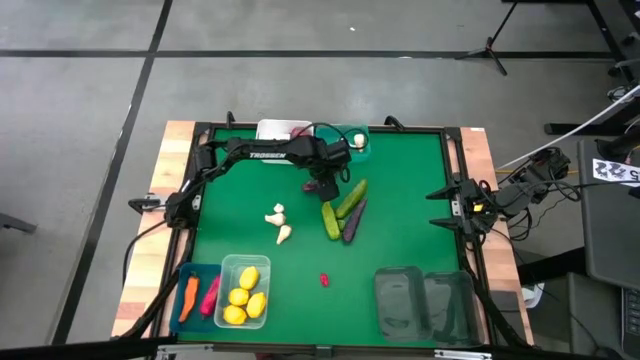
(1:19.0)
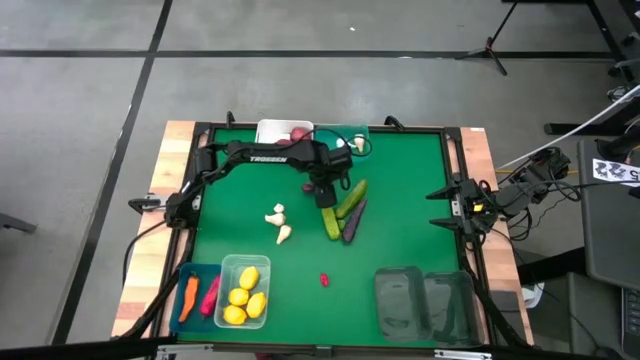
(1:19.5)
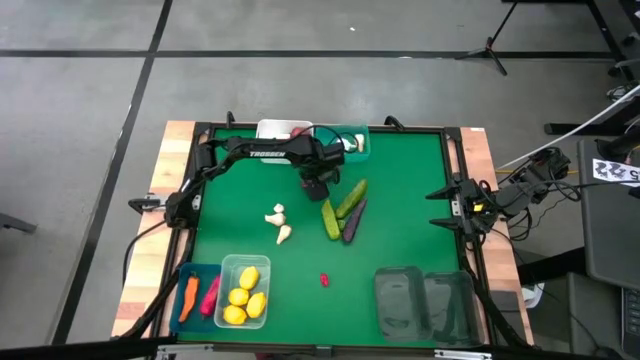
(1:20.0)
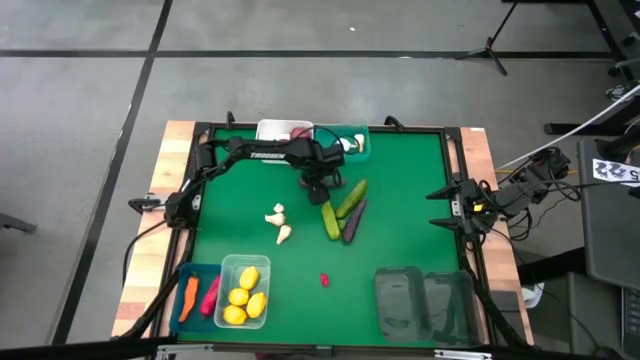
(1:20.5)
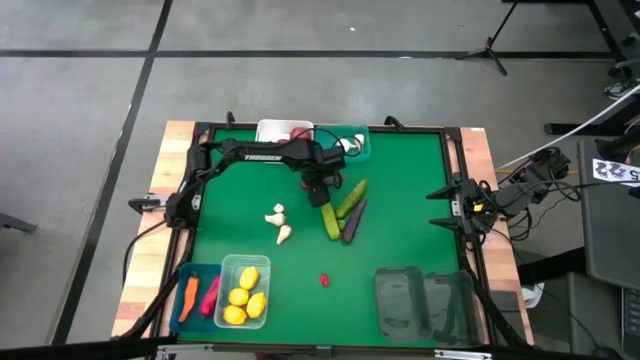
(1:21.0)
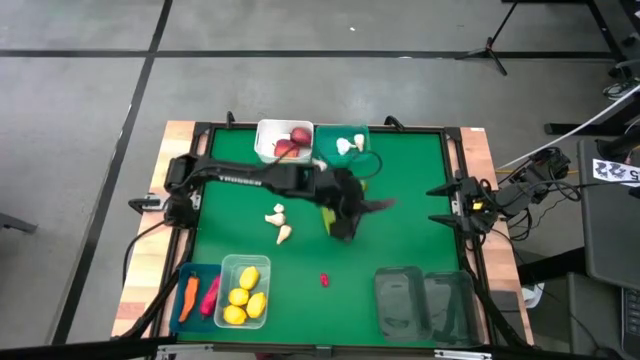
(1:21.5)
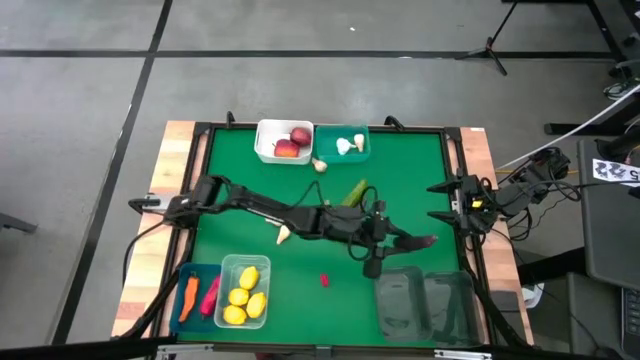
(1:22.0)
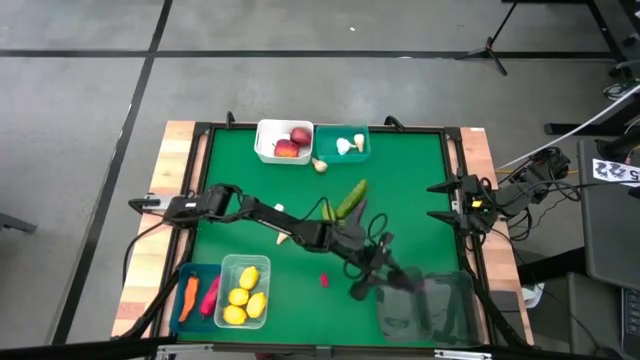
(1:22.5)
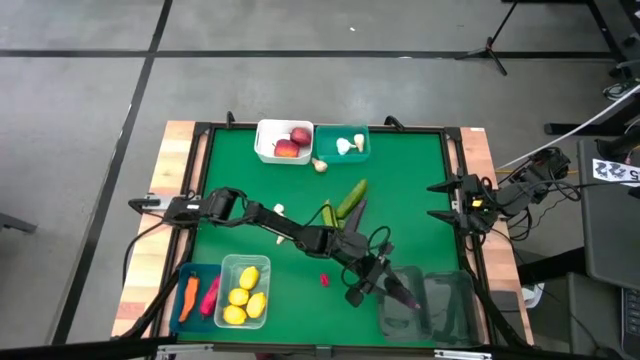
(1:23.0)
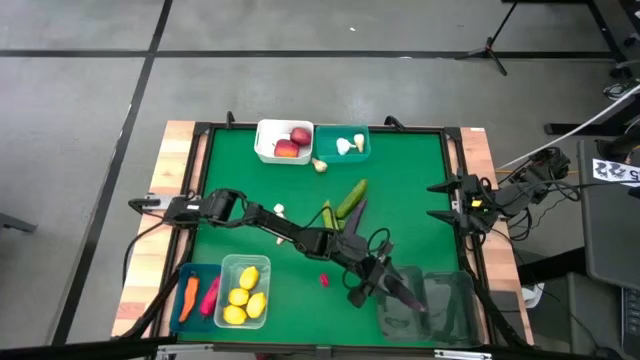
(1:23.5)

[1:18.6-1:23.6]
Task: Sort produce into baskets
Put the eggplant into the left black bin

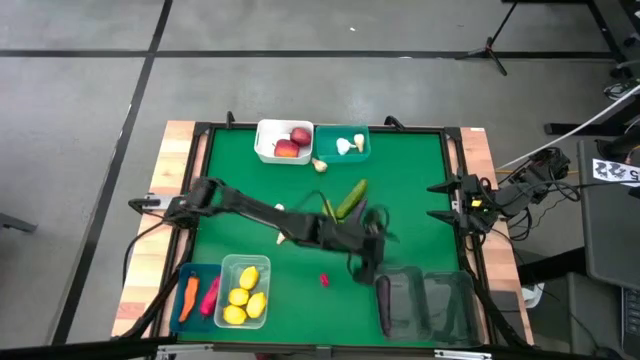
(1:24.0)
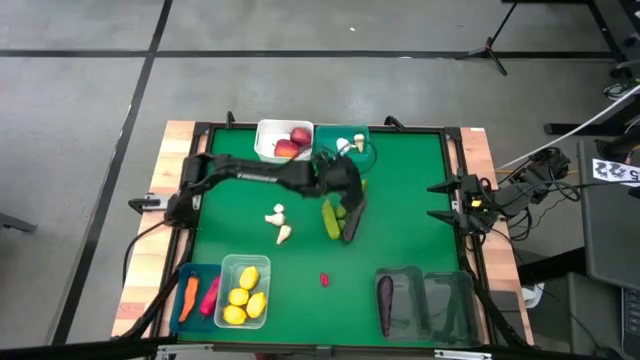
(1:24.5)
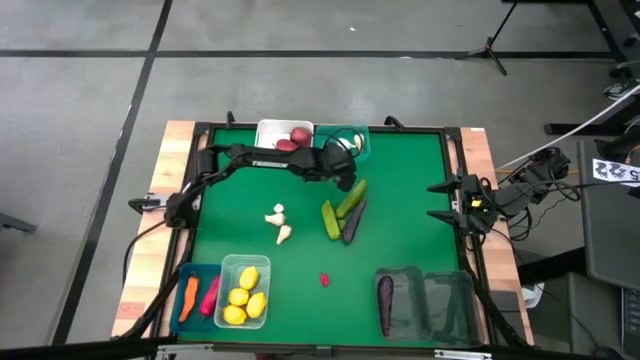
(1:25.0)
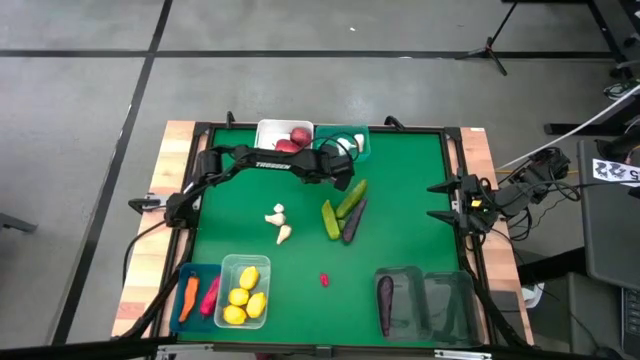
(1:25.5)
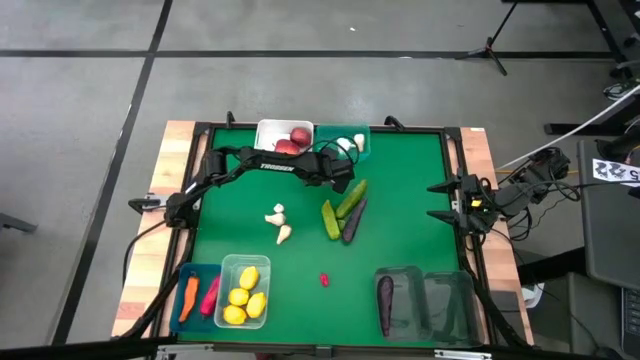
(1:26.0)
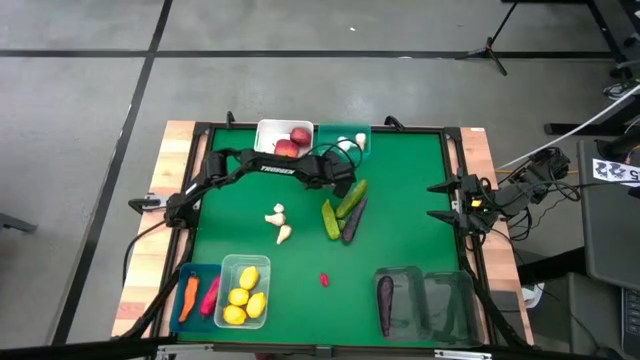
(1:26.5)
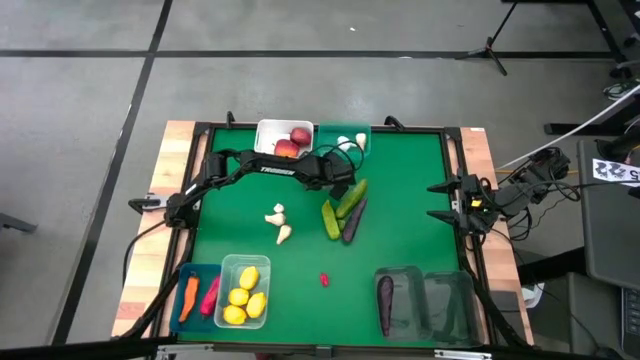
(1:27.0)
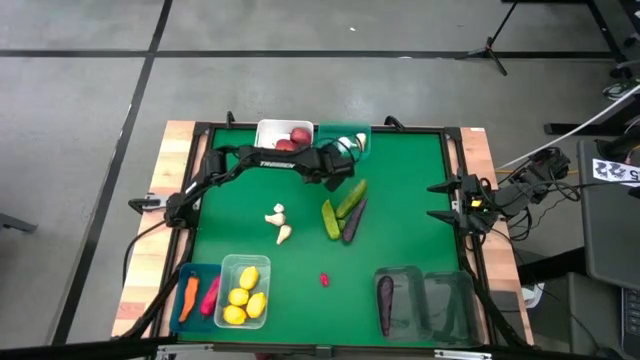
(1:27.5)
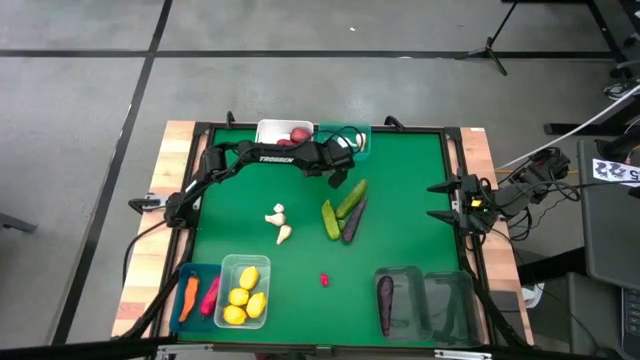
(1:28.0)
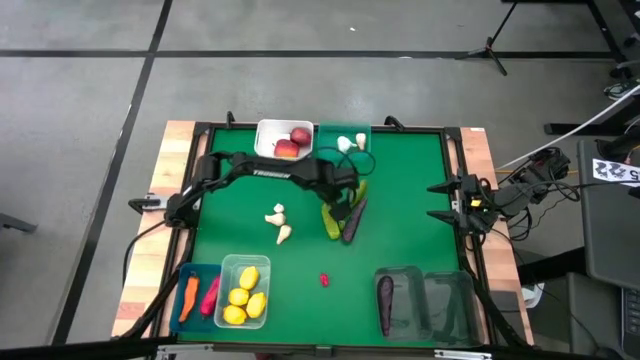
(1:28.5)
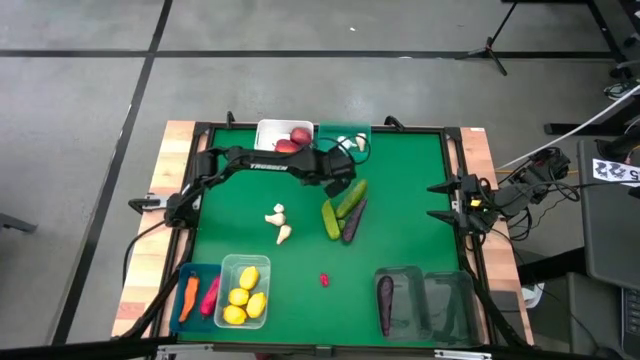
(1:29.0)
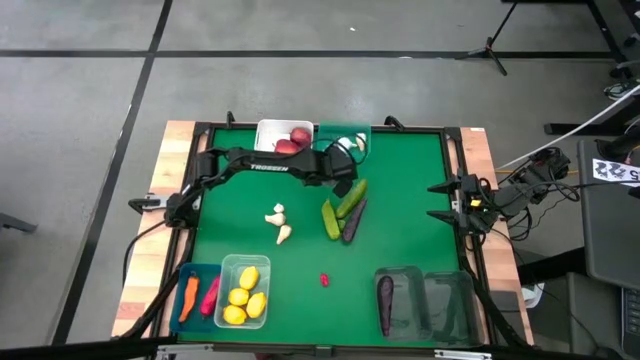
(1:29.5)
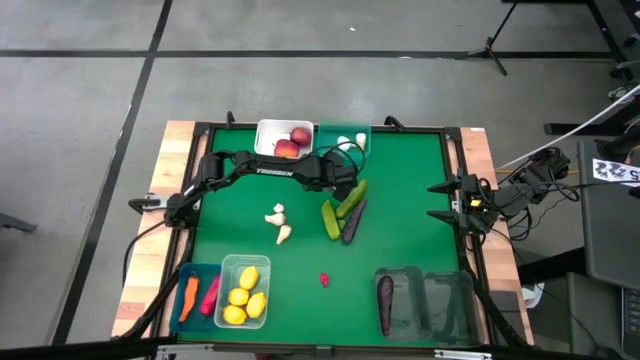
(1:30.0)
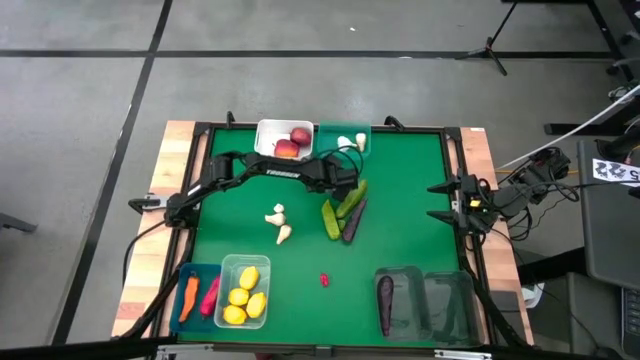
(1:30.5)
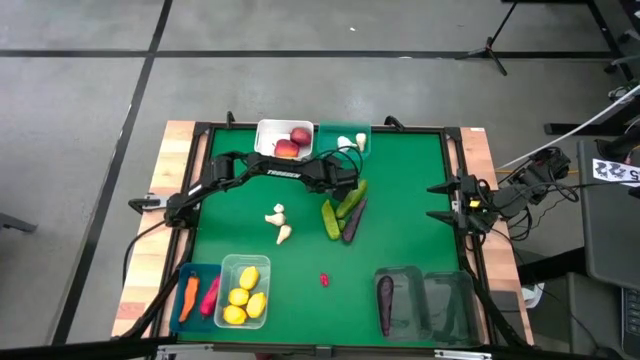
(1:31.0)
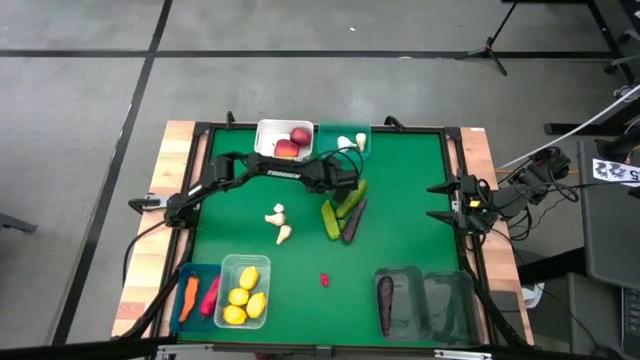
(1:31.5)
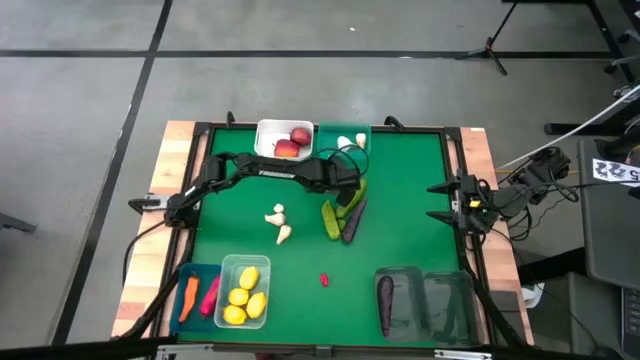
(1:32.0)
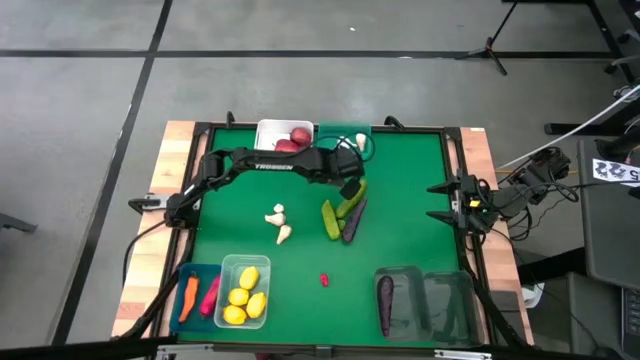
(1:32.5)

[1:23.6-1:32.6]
Put the white garlic into the green bin

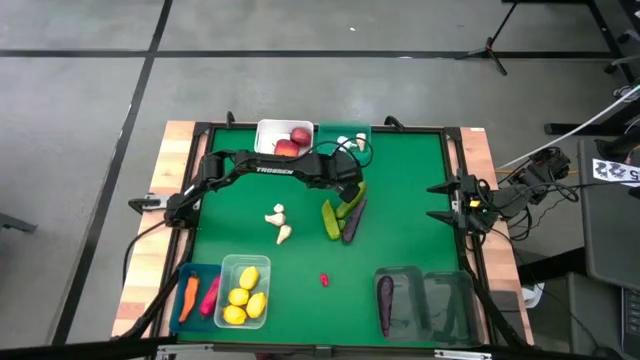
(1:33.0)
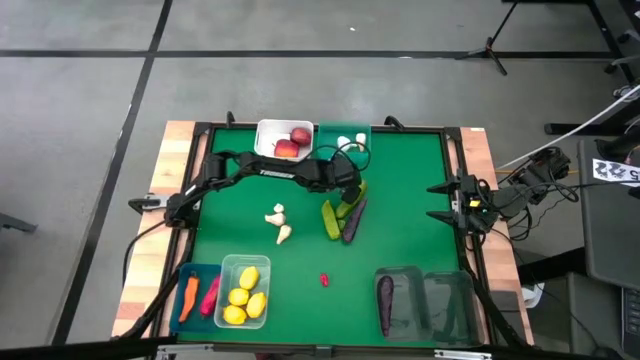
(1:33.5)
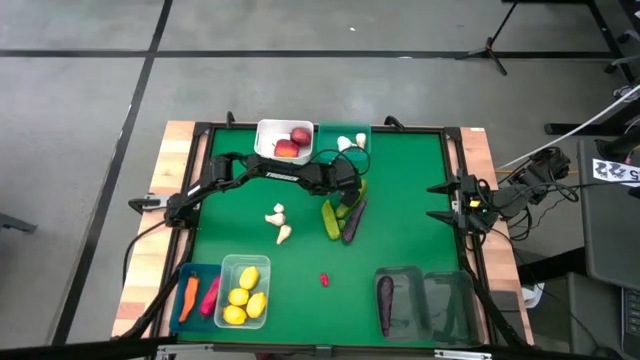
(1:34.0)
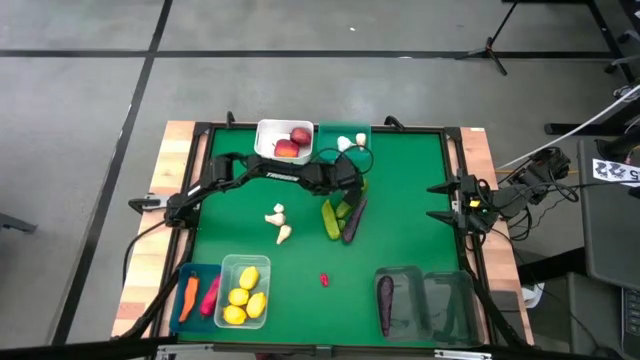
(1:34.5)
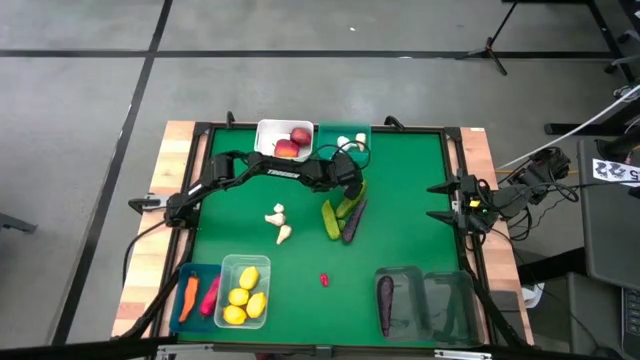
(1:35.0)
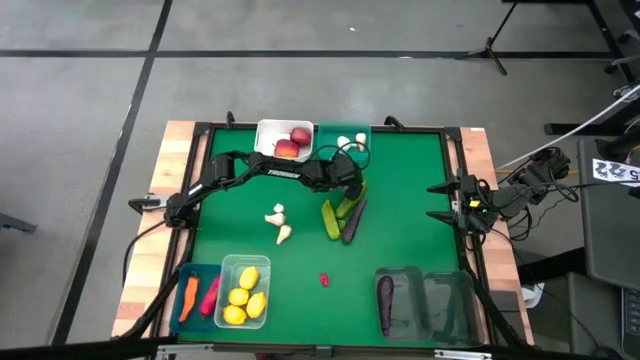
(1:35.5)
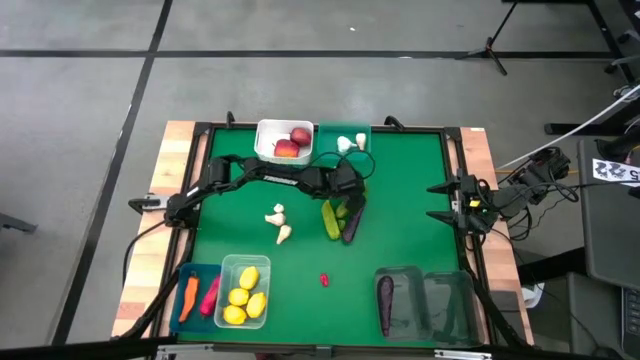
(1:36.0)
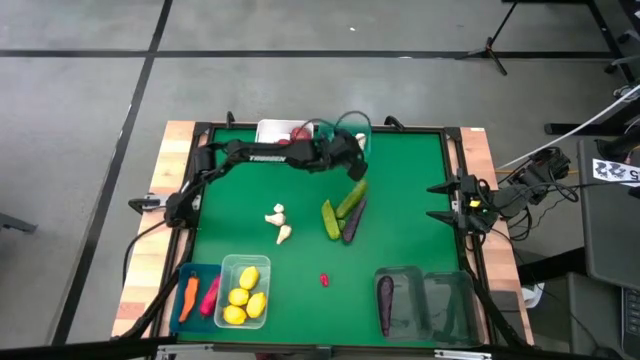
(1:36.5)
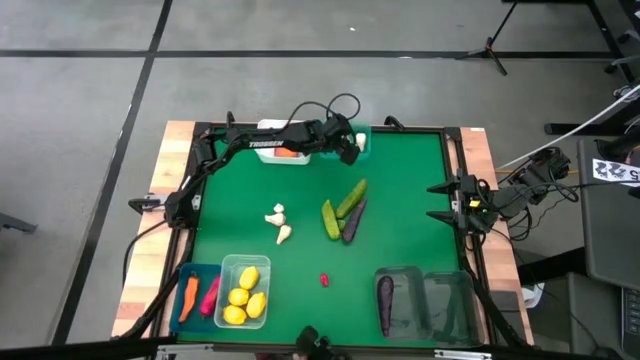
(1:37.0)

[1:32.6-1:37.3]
Put the white garlic into the green bin

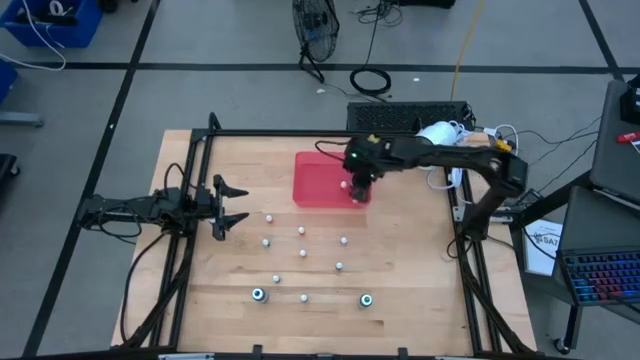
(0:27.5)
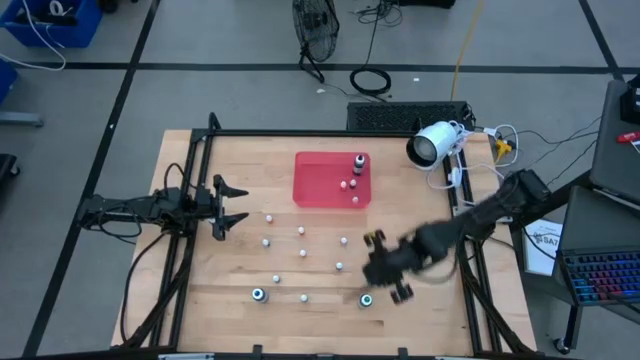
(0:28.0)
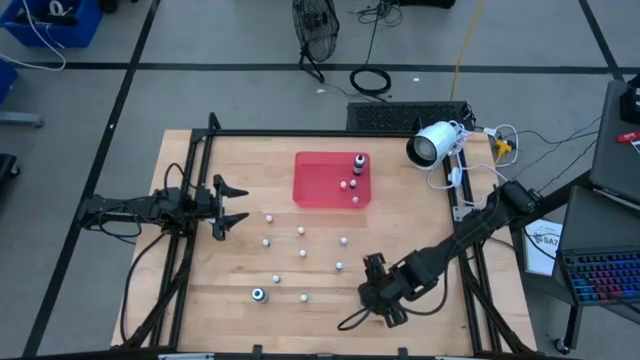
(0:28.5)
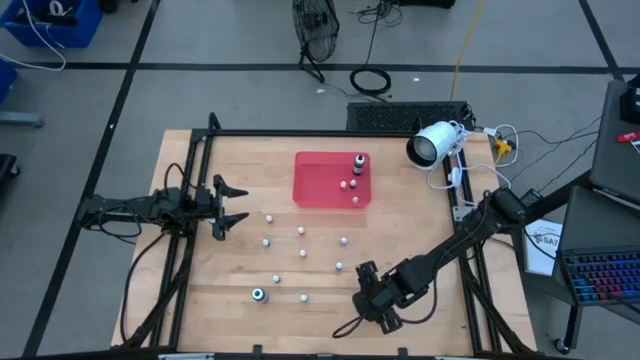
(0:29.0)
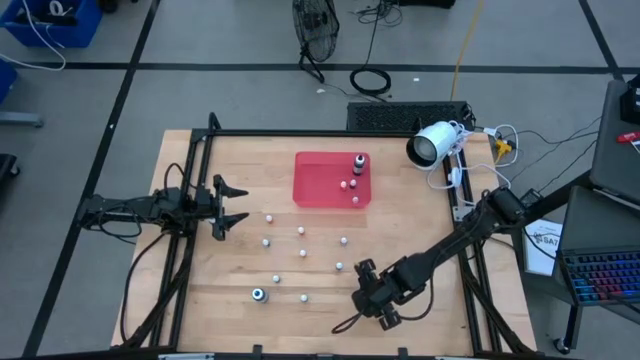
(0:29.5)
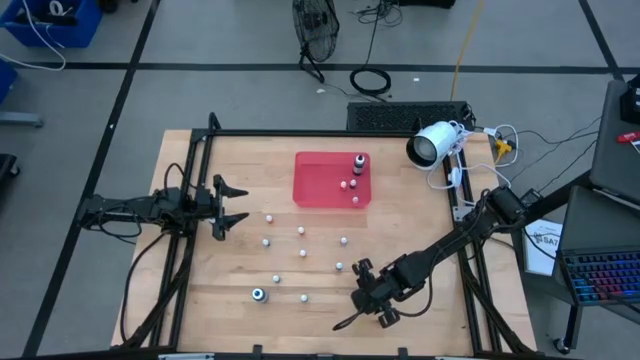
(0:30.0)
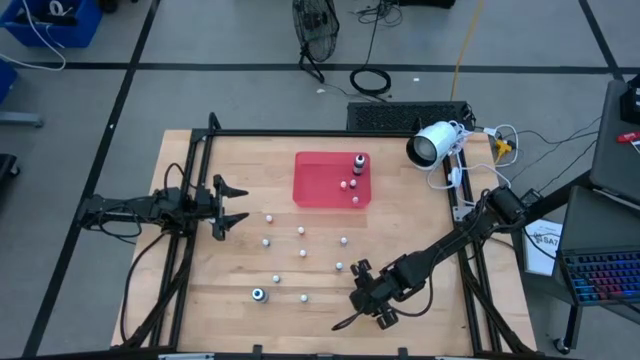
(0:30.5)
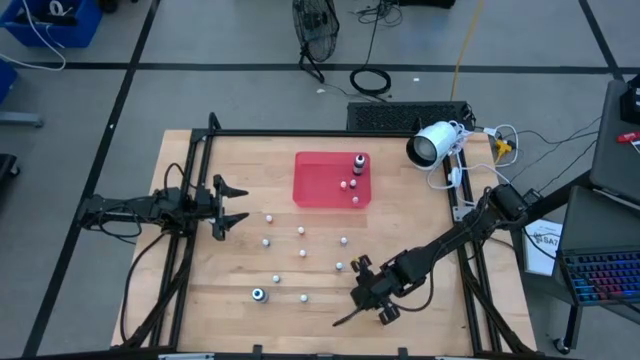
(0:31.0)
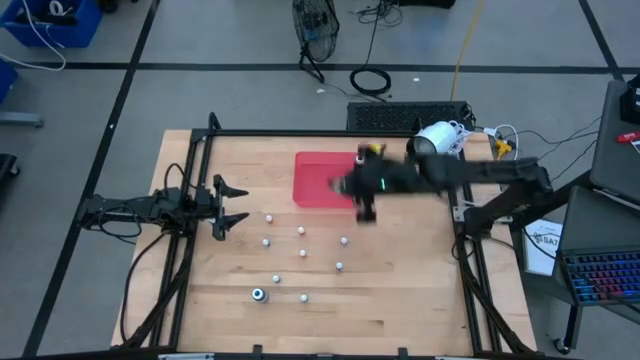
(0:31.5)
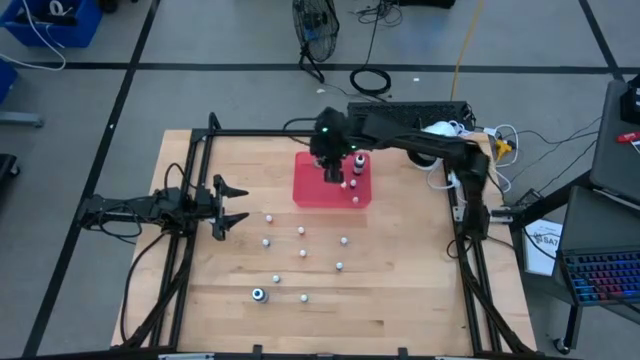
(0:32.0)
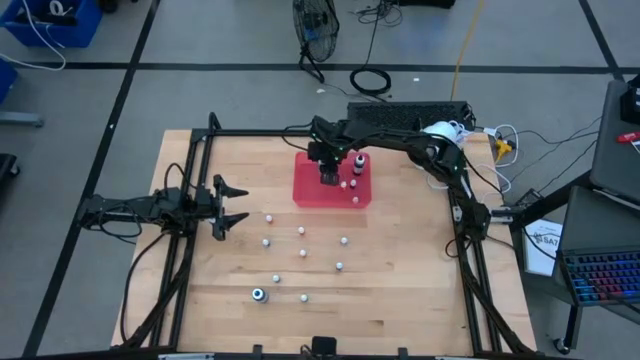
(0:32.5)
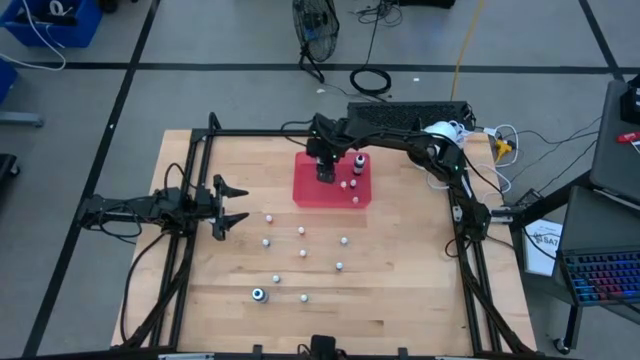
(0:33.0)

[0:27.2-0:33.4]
Task: Pick & Place food coloring
Put the large green food coloring bottle into the bin
